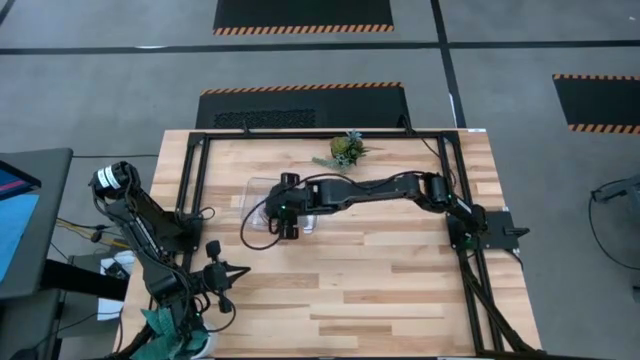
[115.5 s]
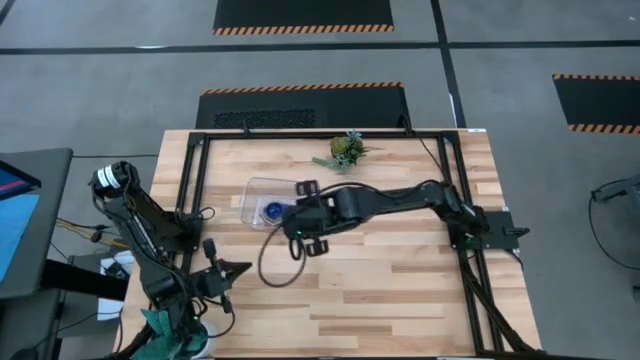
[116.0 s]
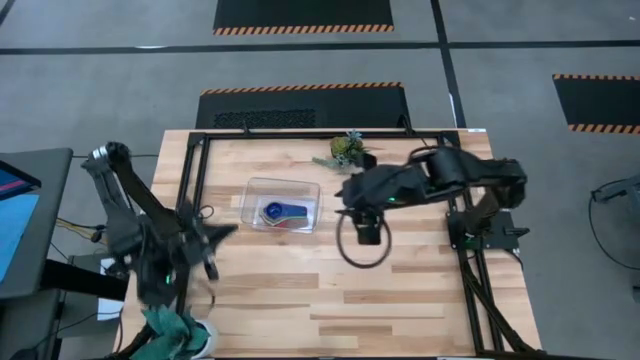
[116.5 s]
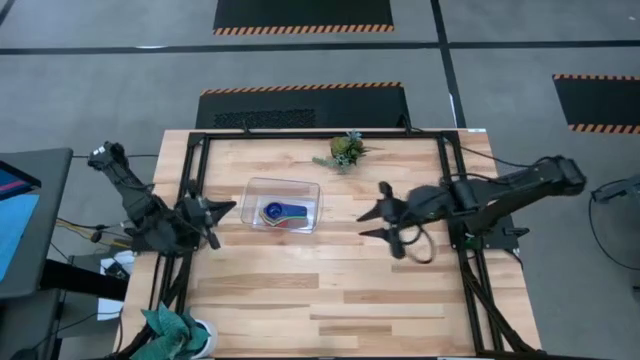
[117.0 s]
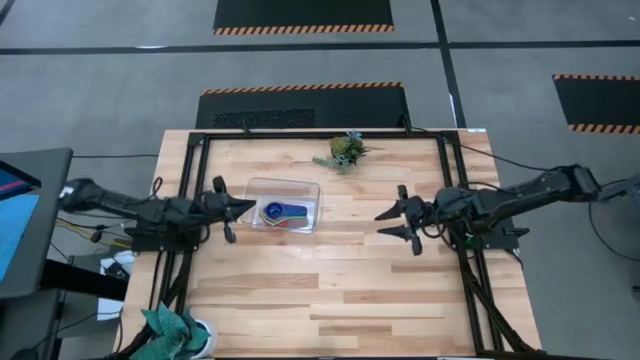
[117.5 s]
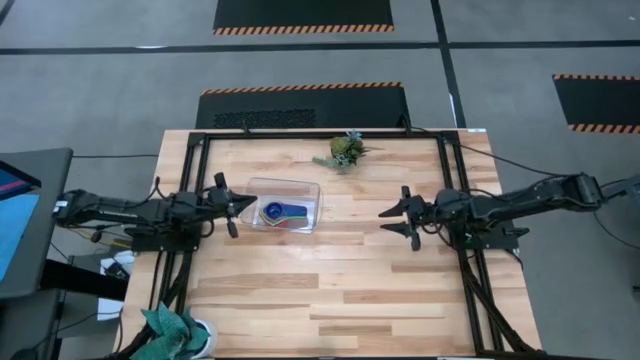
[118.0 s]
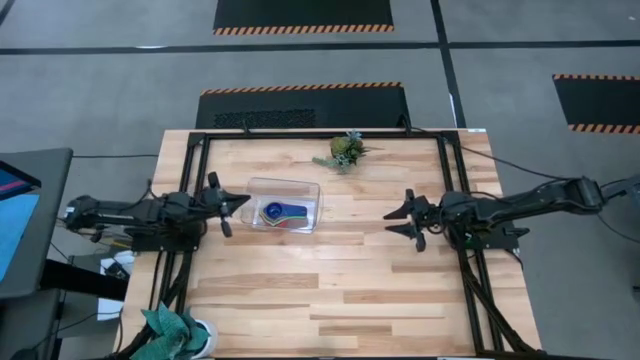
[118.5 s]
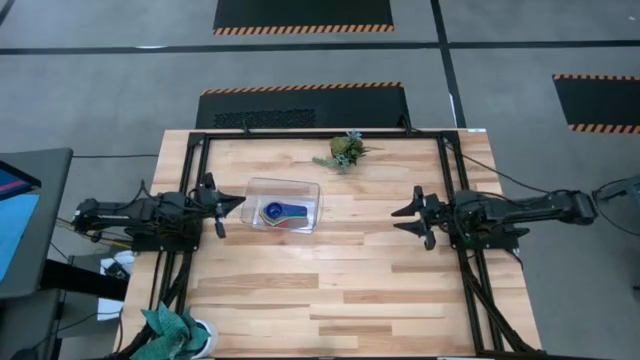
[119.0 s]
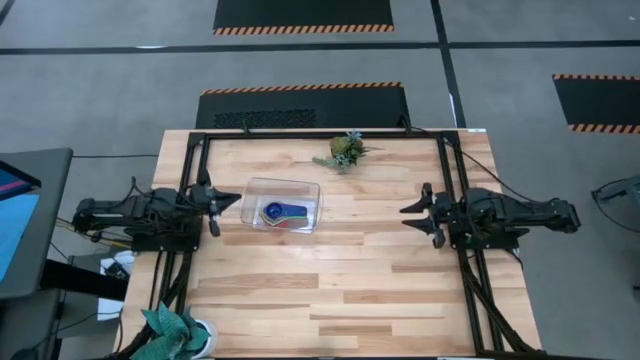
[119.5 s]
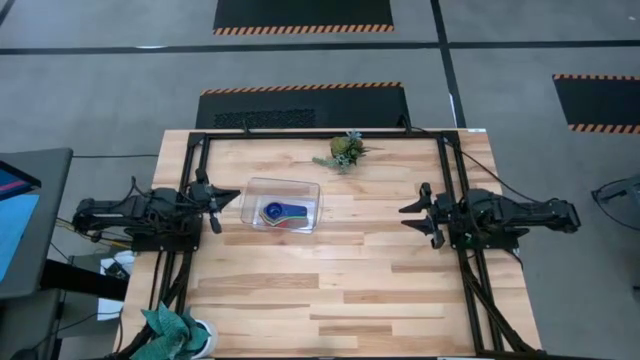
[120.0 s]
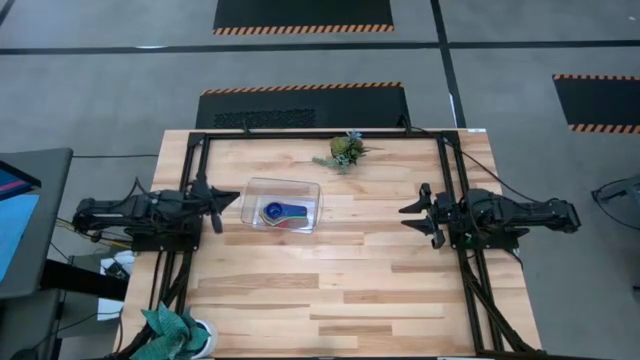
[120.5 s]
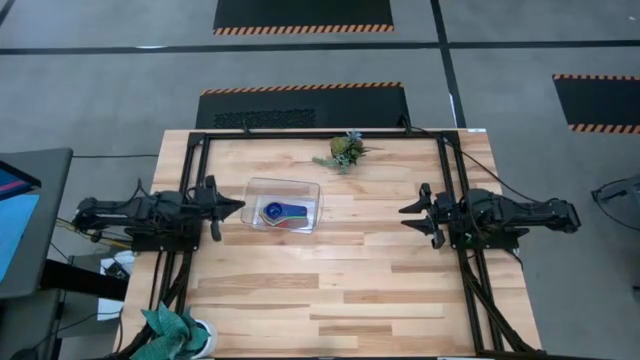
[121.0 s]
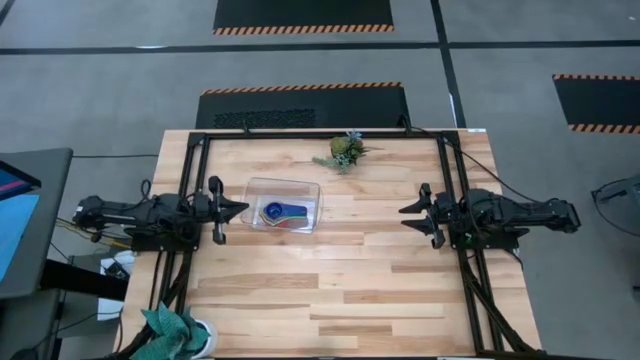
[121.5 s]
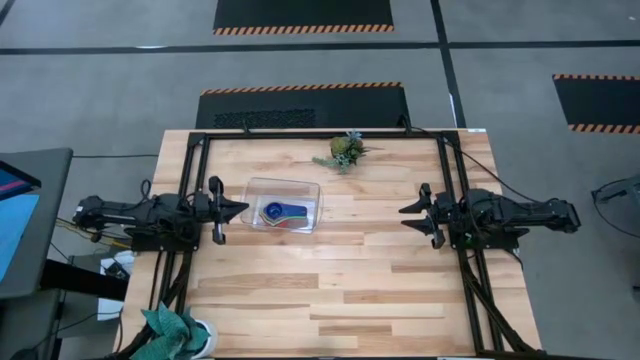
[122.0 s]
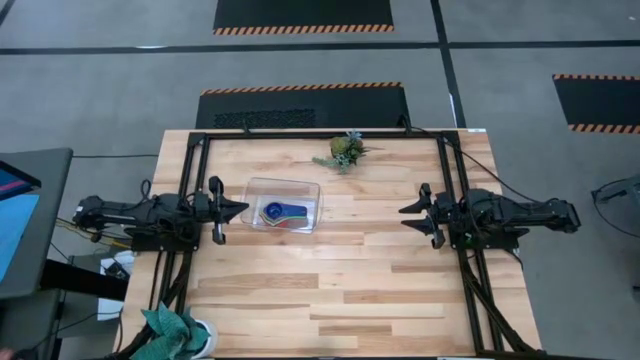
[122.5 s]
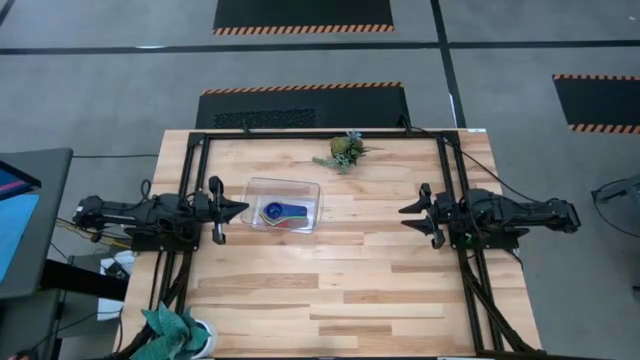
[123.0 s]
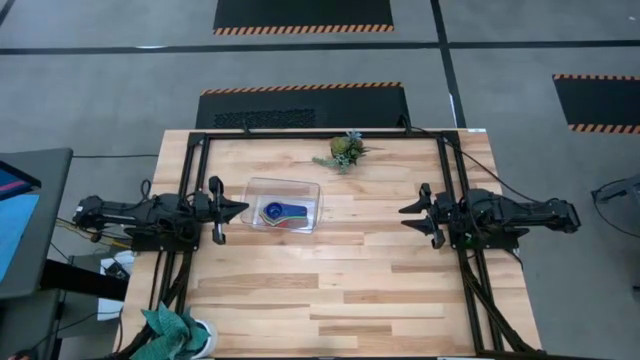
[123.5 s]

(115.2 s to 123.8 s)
Task: Nest measuring cups in basket
Return to Home Position

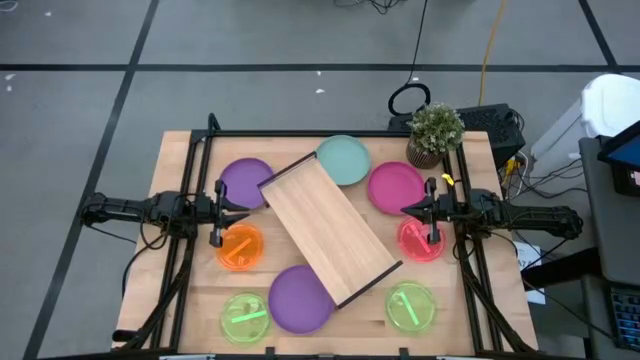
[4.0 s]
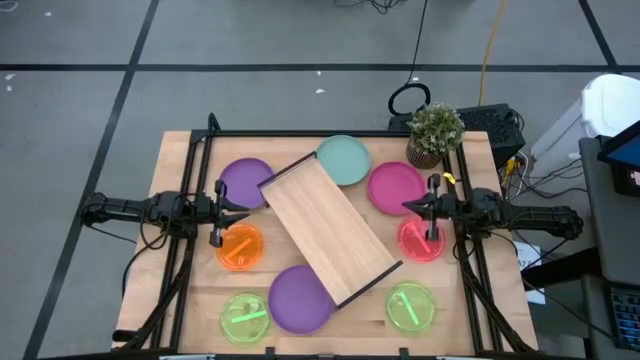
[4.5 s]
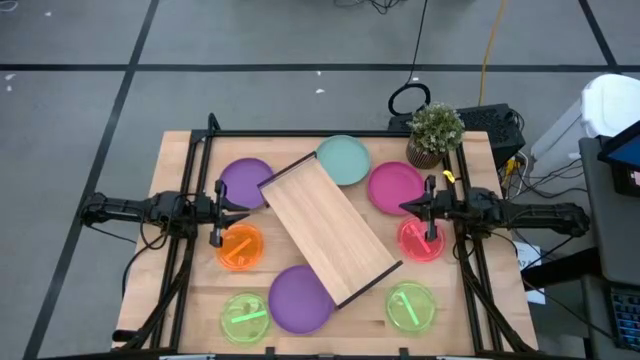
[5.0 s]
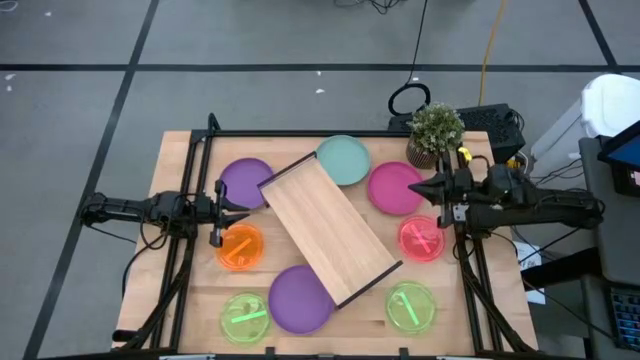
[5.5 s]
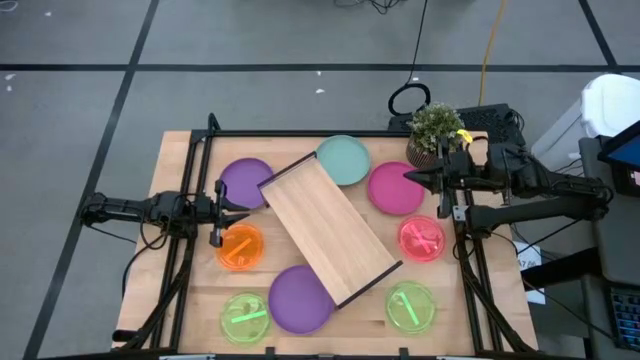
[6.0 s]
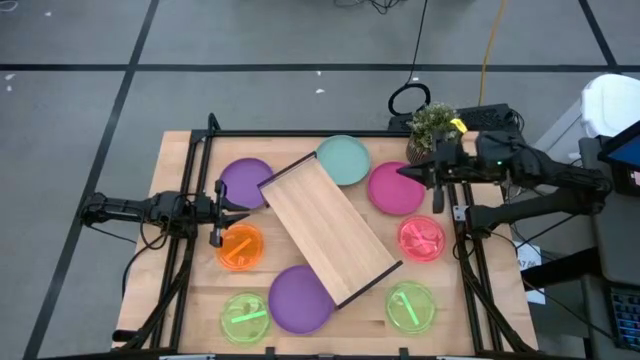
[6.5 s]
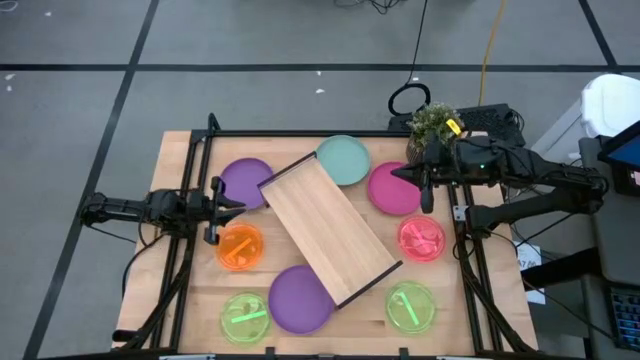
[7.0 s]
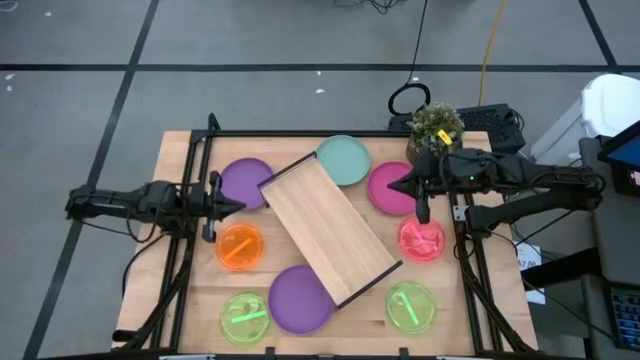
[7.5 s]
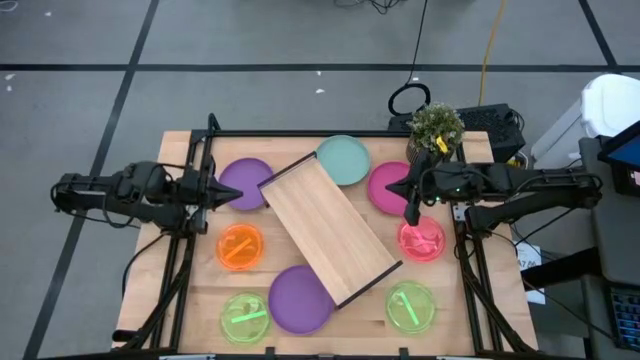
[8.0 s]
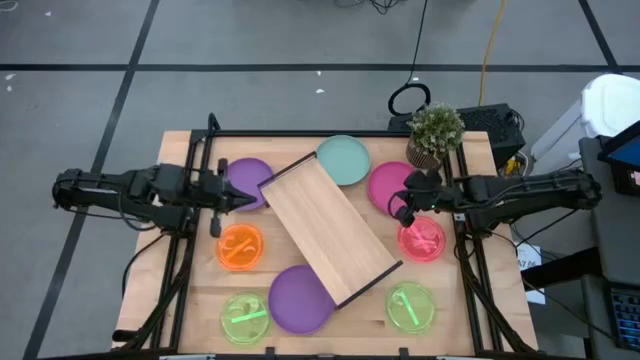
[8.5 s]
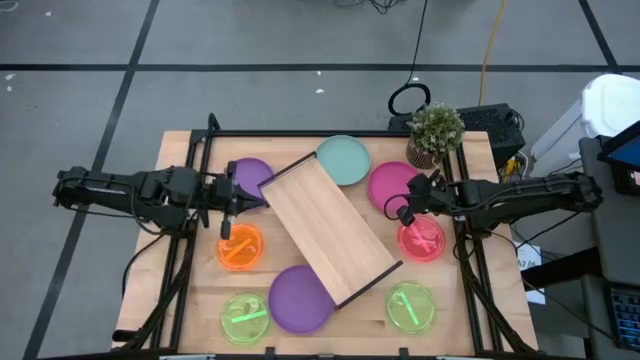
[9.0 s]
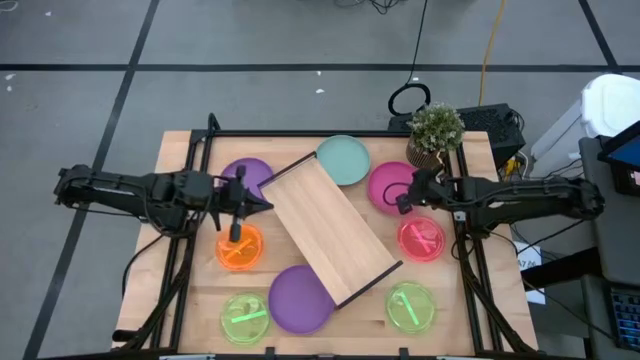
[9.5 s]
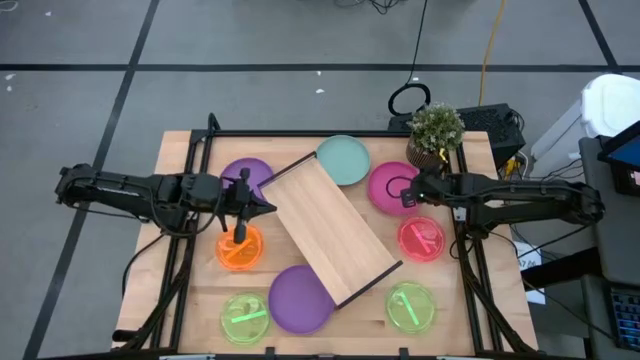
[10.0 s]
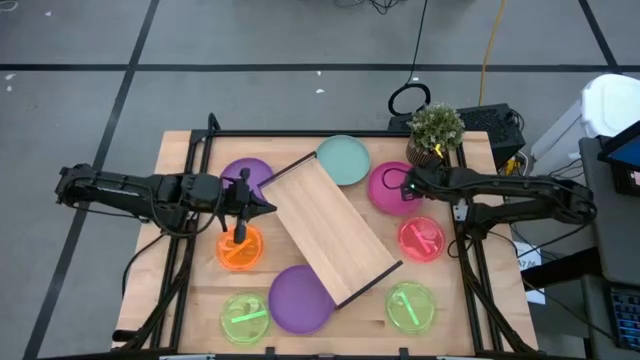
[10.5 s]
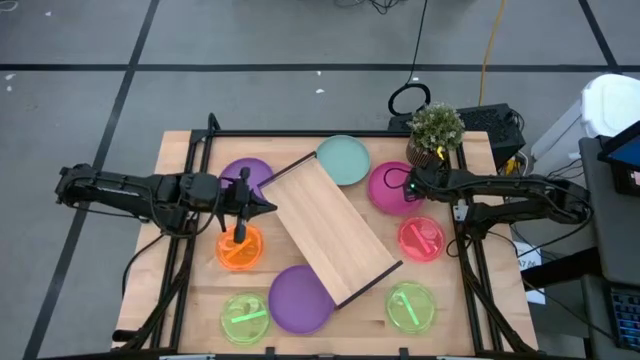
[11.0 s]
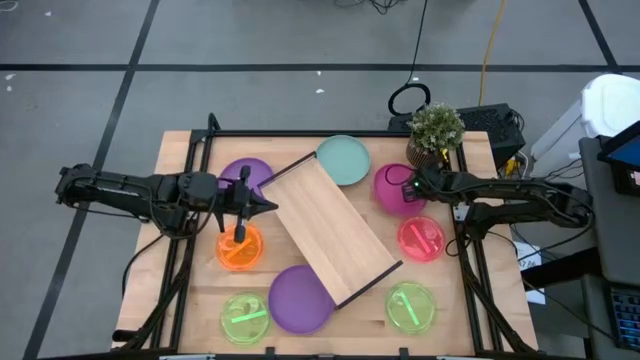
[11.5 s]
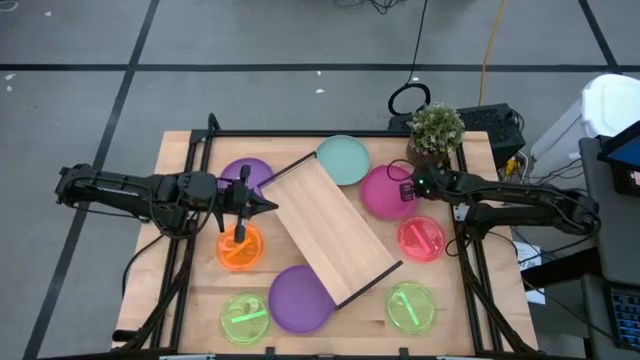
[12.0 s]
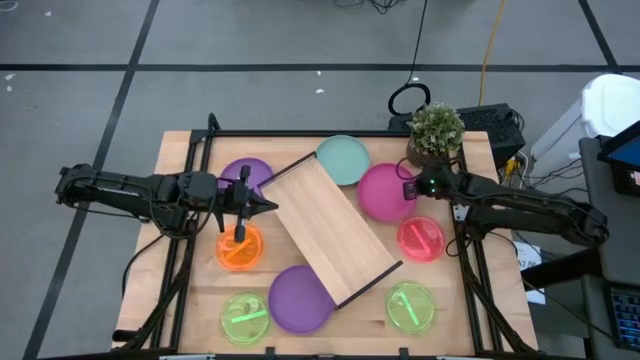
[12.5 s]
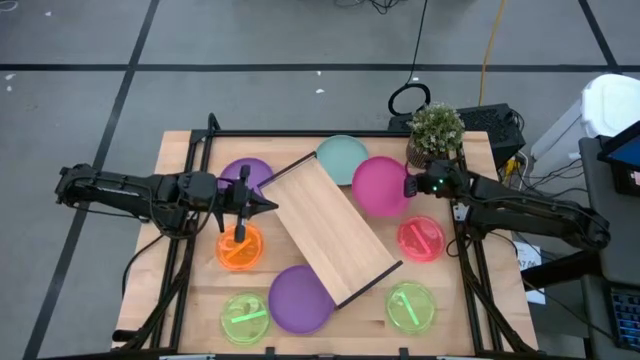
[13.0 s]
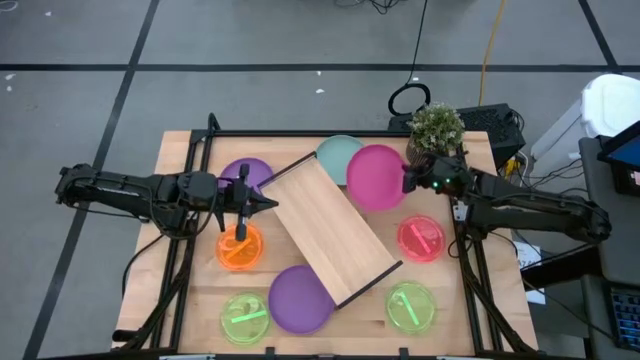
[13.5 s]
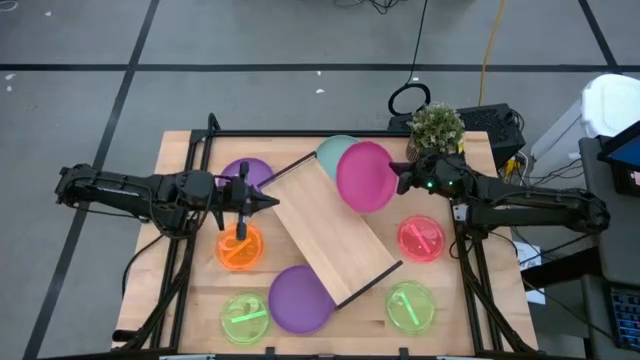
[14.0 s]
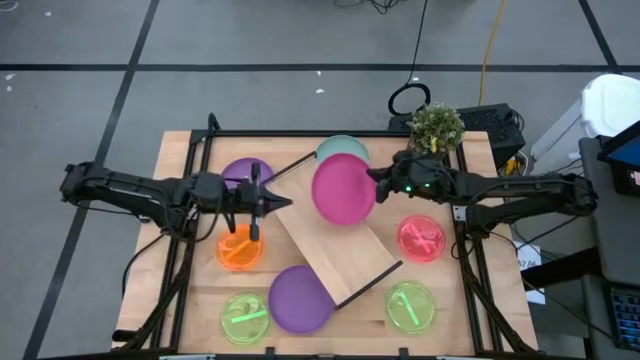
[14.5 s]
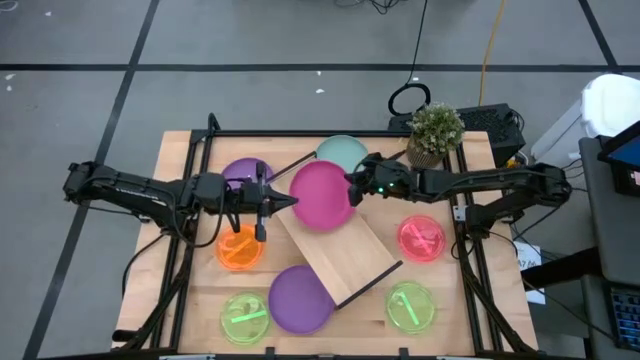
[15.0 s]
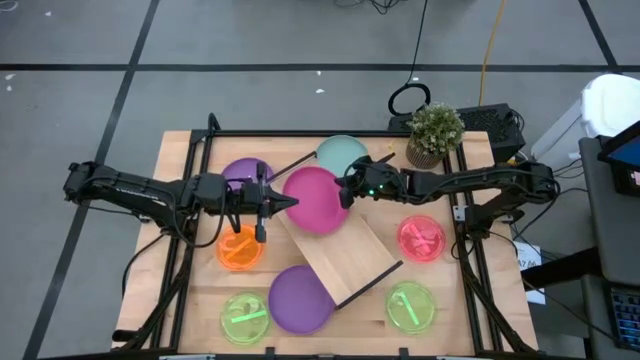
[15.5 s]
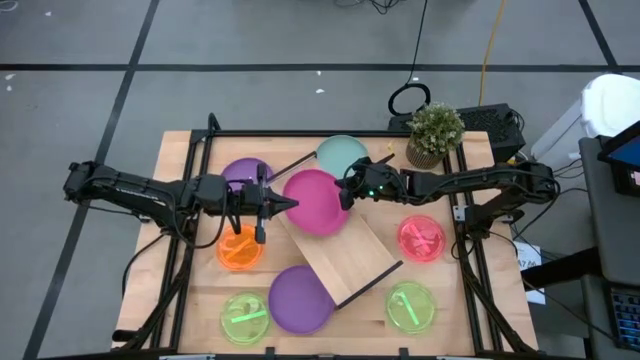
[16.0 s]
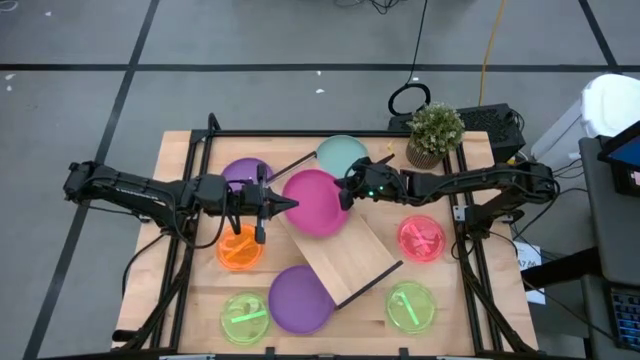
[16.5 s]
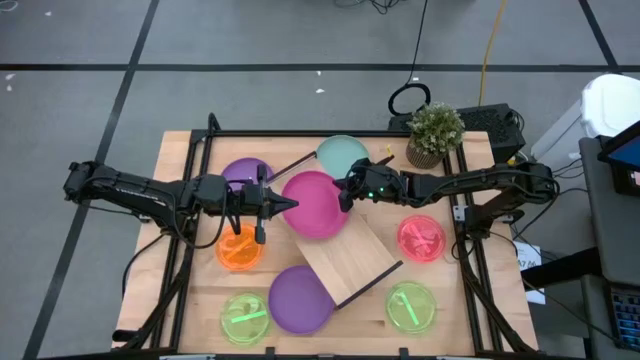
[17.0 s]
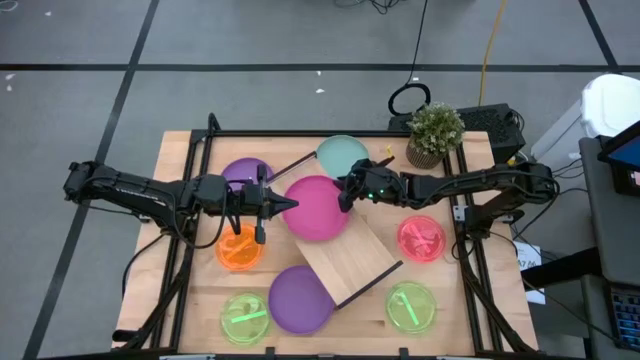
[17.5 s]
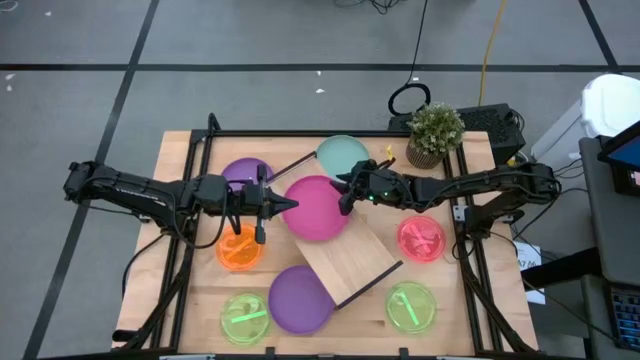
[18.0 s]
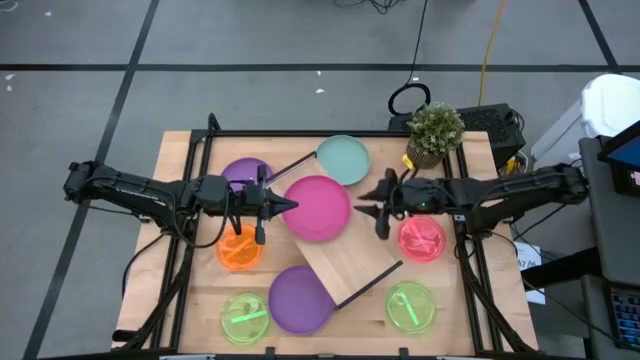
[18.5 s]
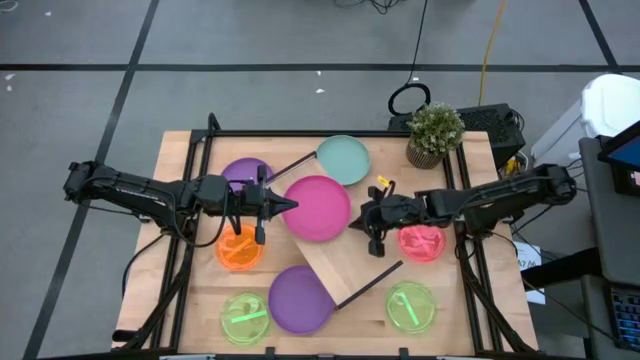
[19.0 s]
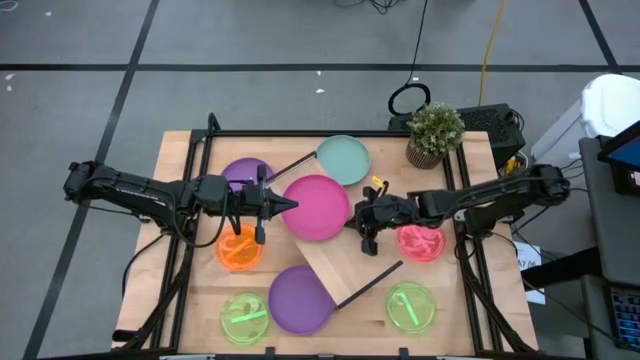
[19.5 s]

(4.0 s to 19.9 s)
Task: Place and stack plates onto a shelf
Put the top pink plate on the shelf
